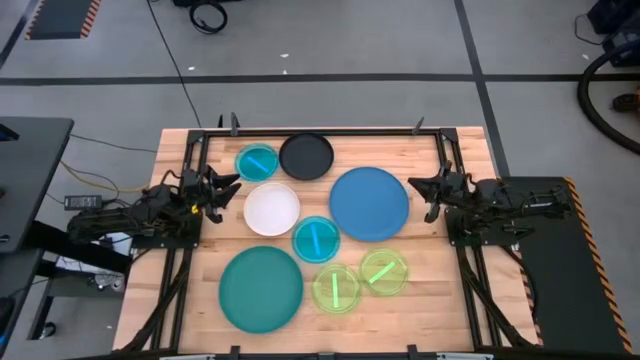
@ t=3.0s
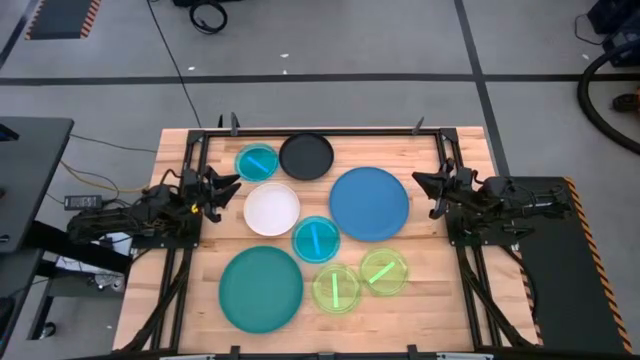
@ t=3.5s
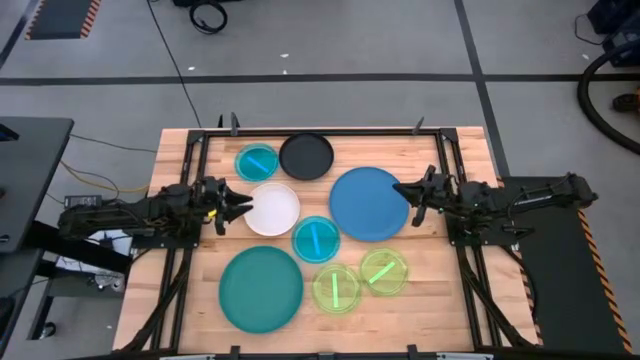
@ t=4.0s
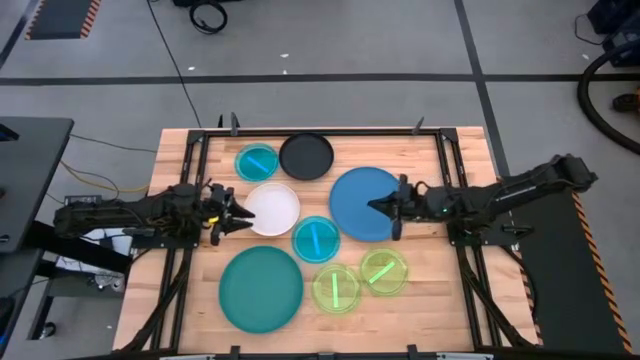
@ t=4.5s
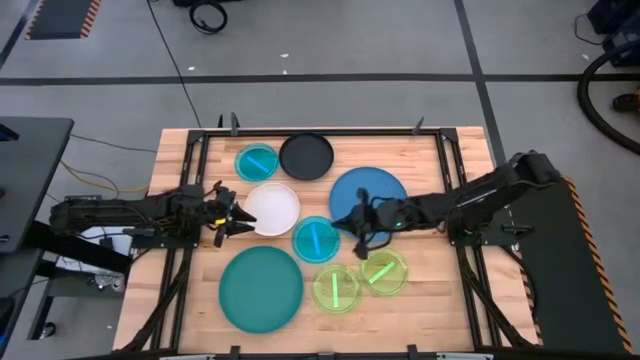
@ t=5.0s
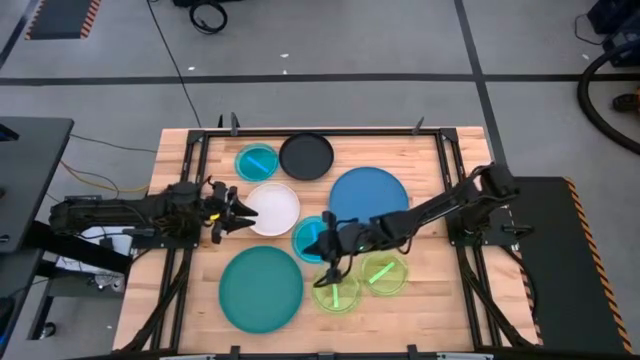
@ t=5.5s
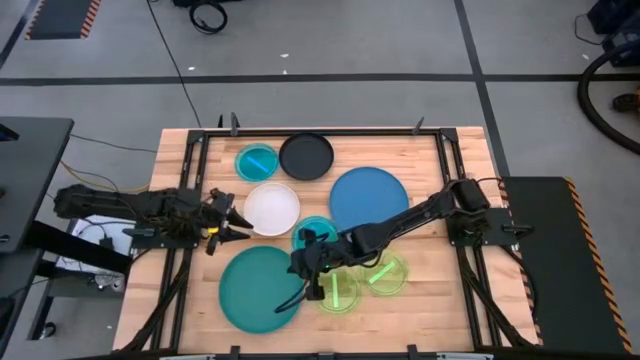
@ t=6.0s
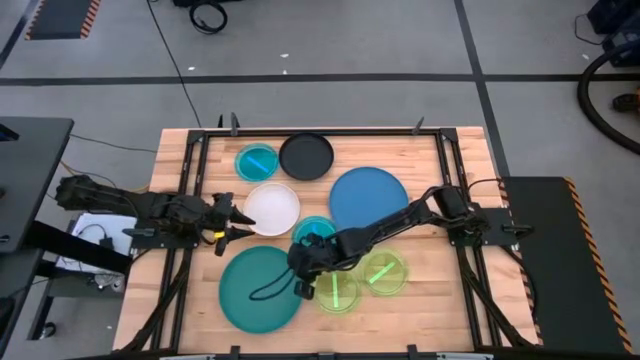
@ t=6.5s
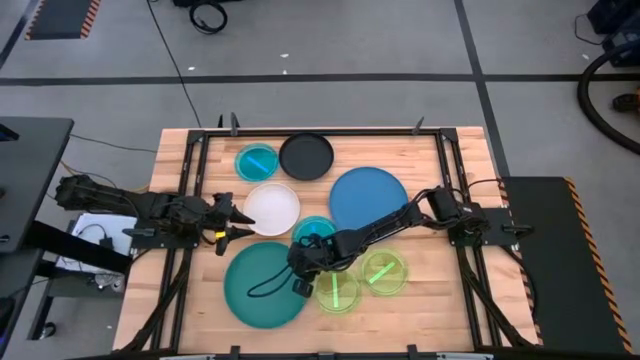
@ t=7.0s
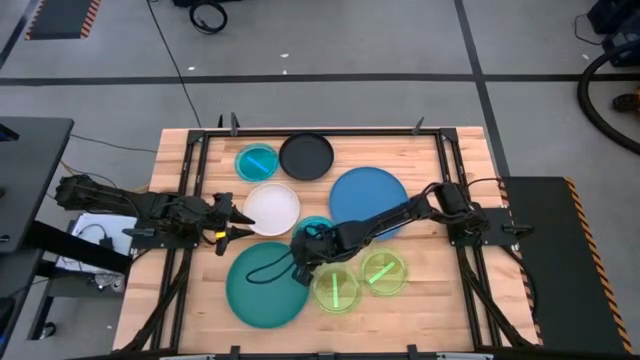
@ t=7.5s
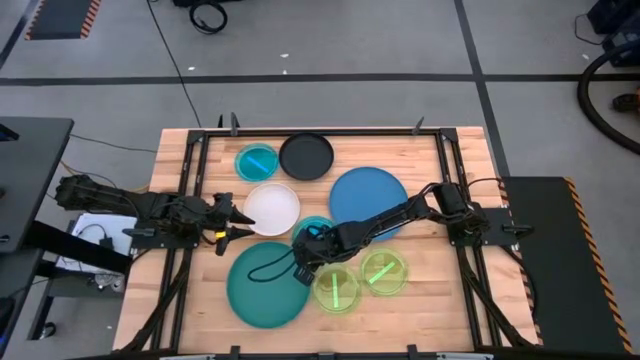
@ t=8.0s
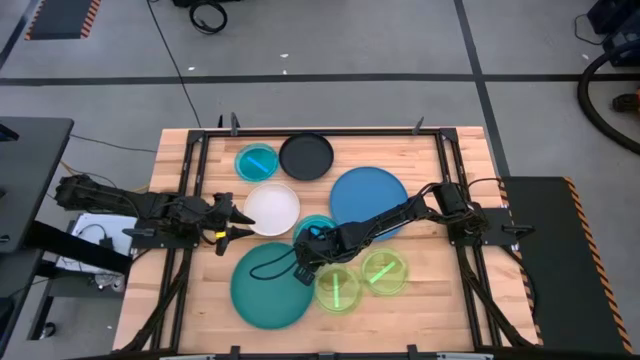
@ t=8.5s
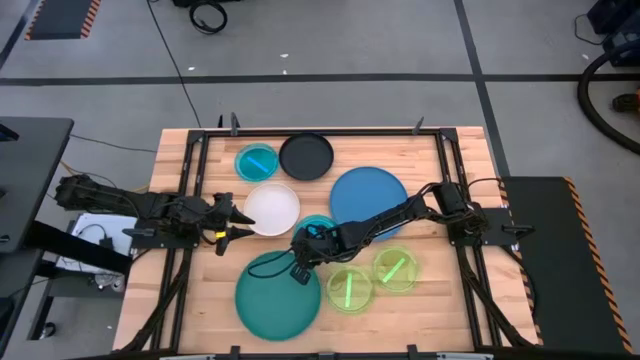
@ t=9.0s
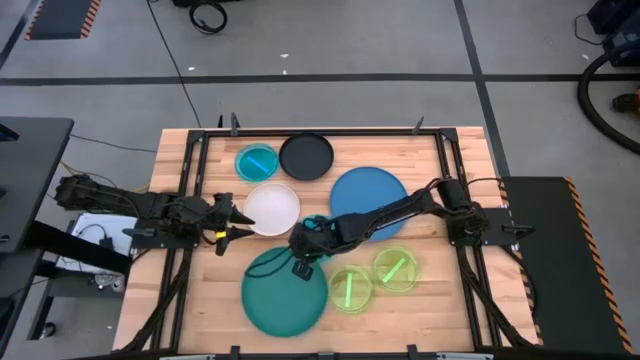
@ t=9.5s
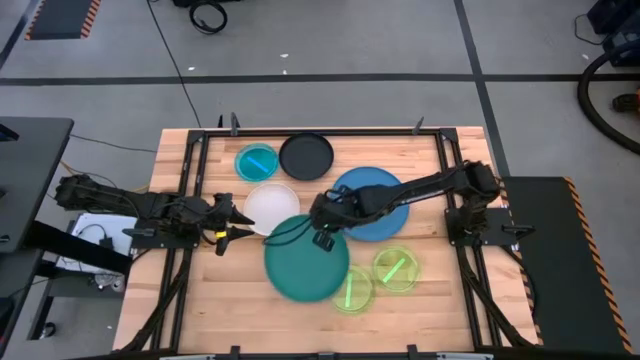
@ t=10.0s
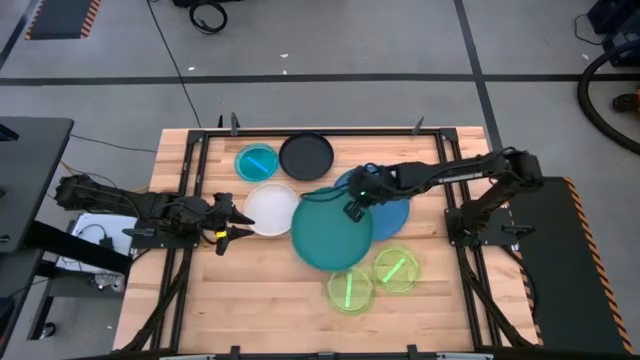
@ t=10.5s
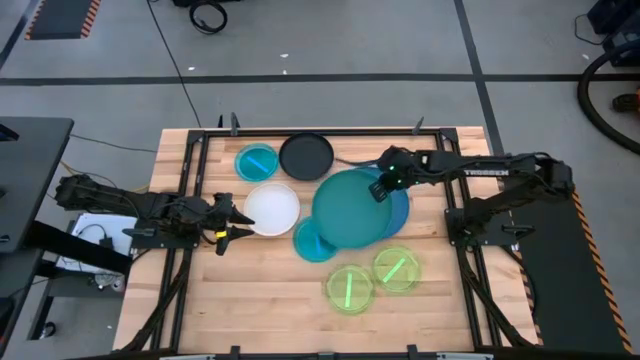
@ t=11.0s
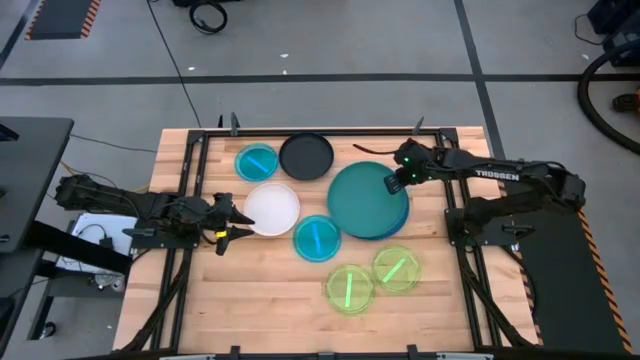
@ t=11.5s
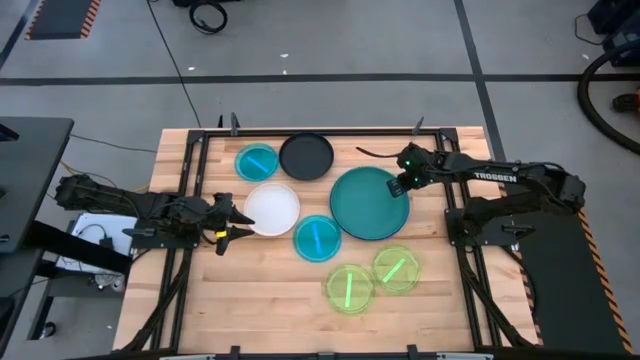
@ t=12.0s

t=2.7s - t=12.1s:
Task: Stack plastic plates
Stack the green plate on top of the blue plate

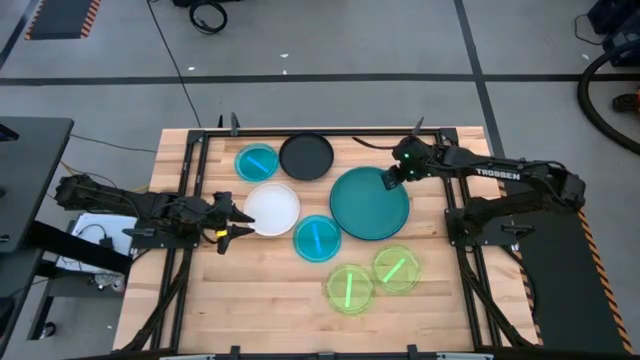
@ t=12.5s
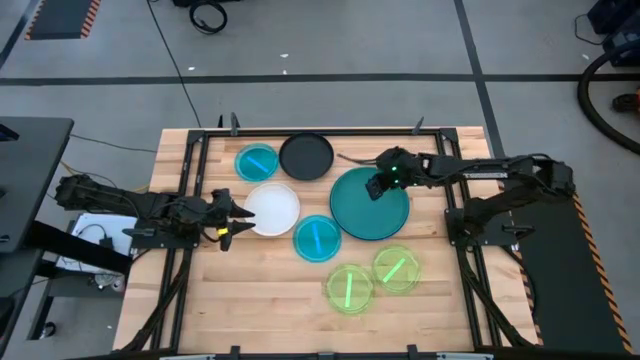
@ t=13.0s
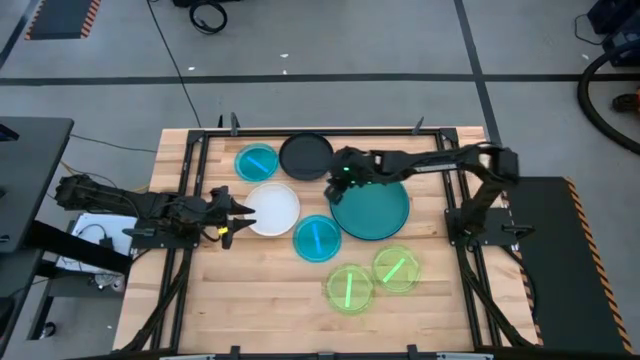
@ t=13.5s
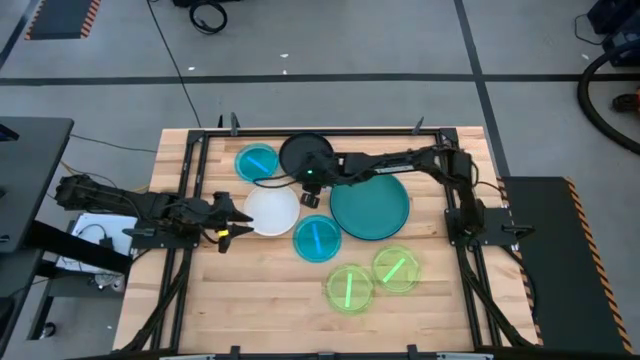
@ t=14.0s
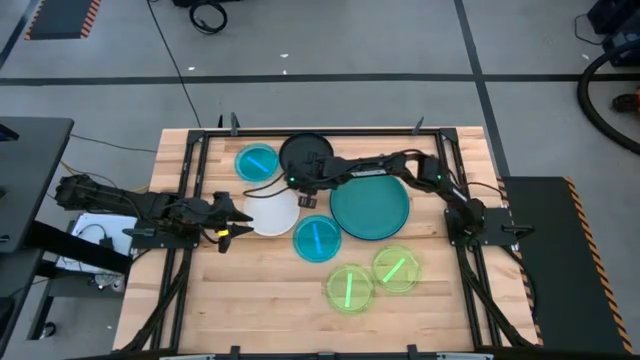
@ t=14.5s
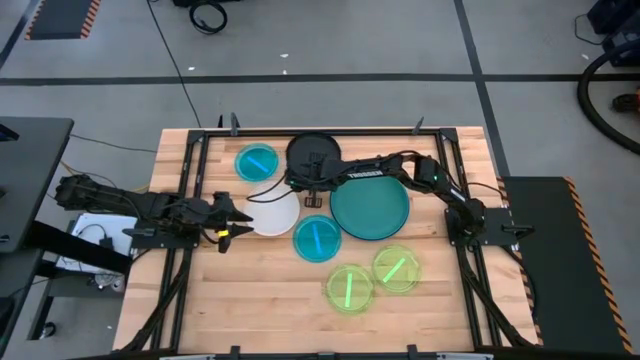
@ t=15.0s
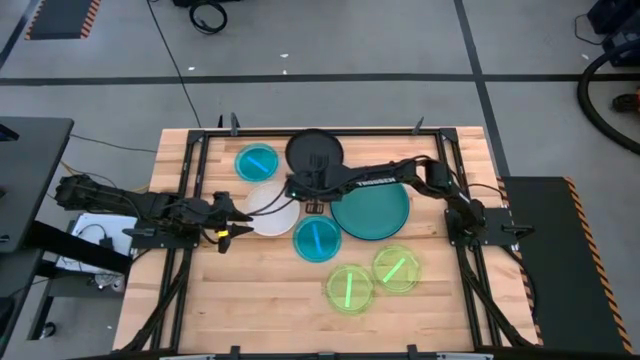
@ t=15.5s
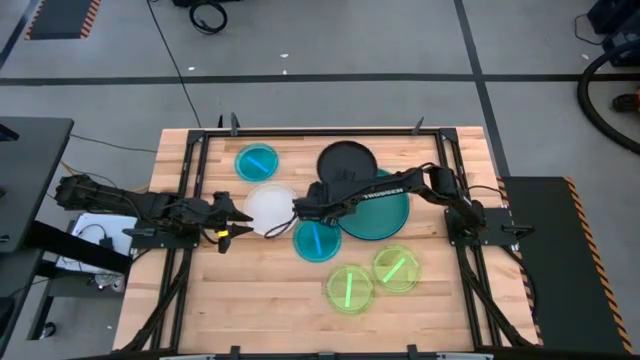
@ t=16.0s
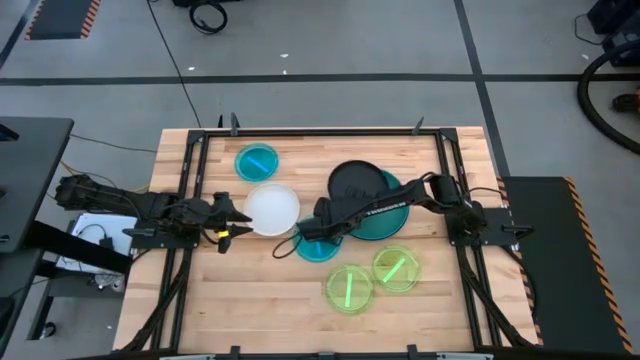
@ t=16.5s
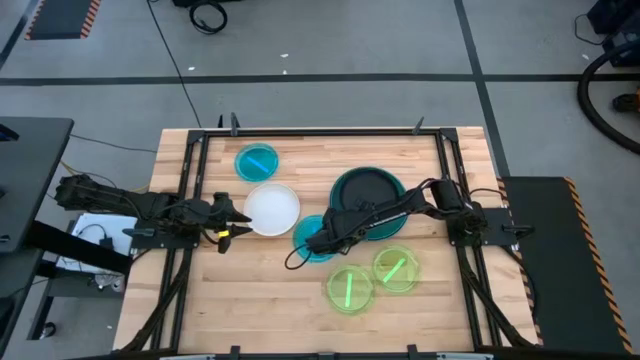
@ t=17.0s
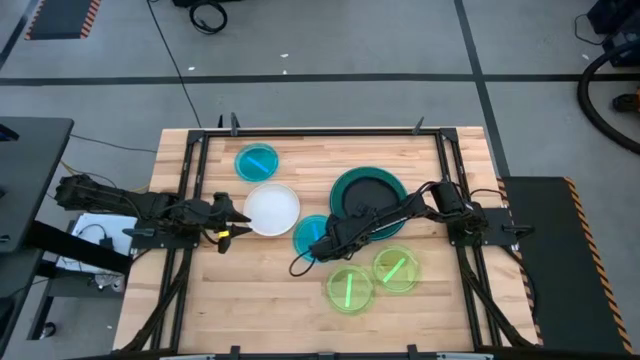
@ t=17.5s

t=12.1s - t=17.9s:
Stack the black plate on top of the green plate

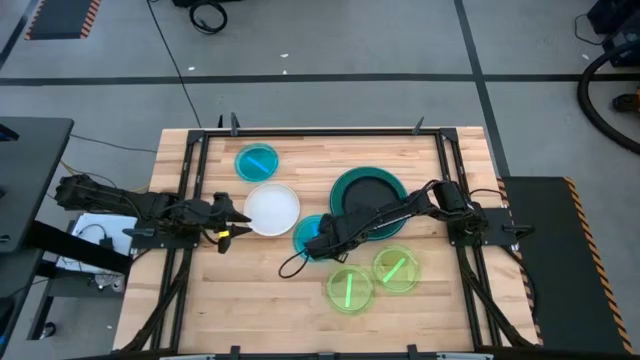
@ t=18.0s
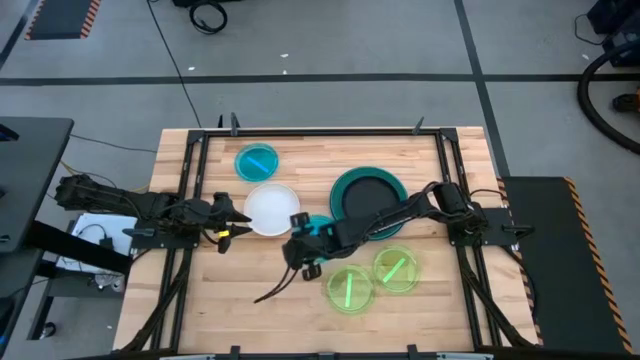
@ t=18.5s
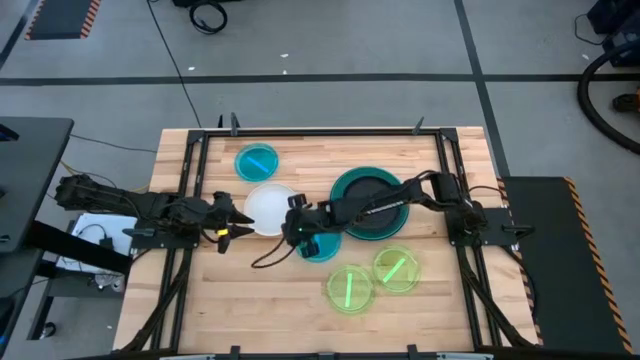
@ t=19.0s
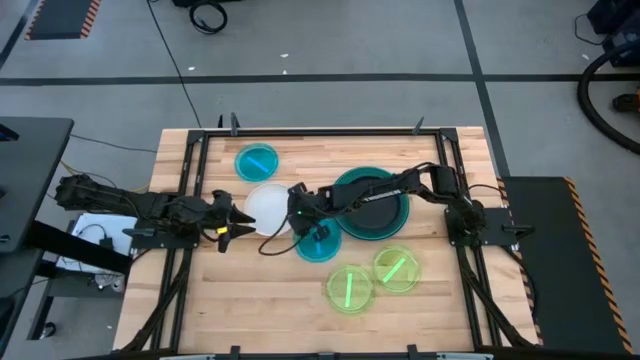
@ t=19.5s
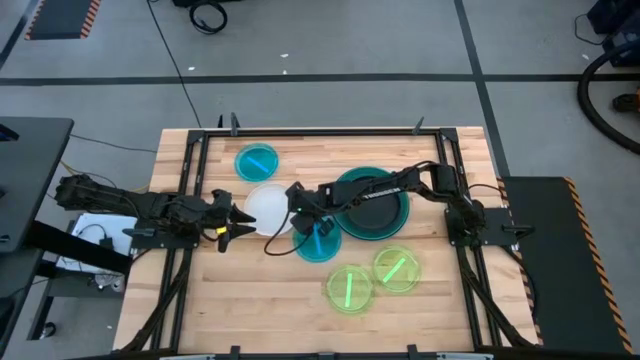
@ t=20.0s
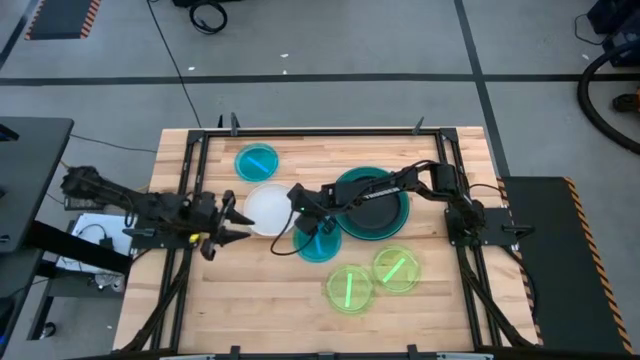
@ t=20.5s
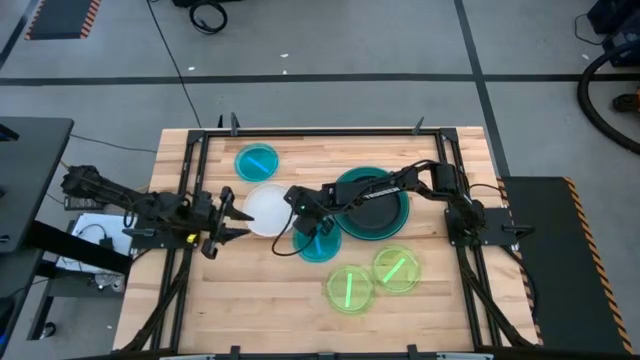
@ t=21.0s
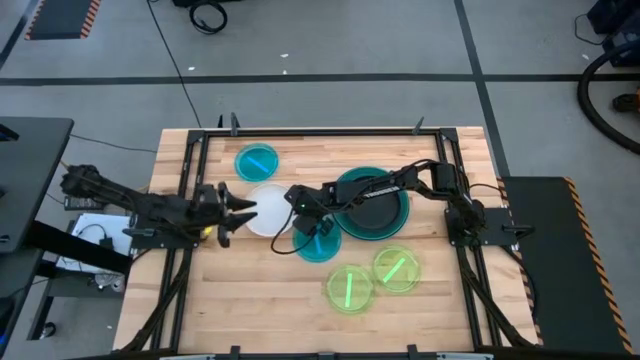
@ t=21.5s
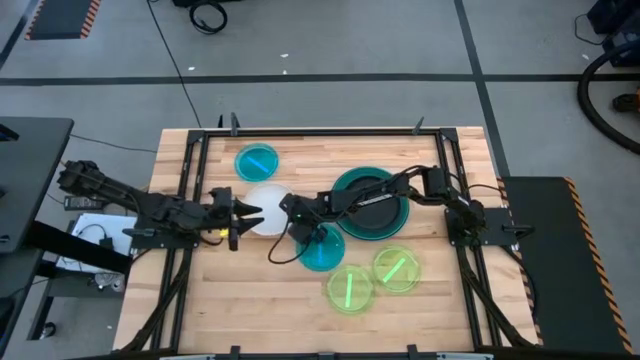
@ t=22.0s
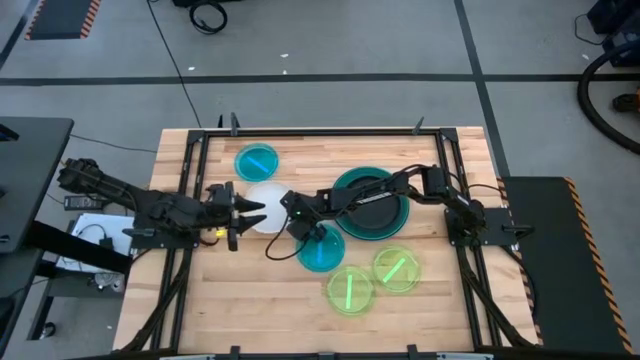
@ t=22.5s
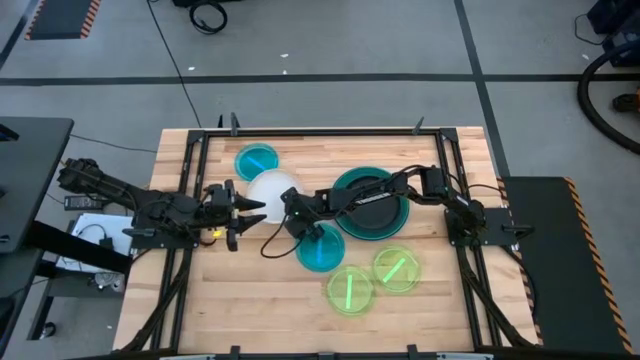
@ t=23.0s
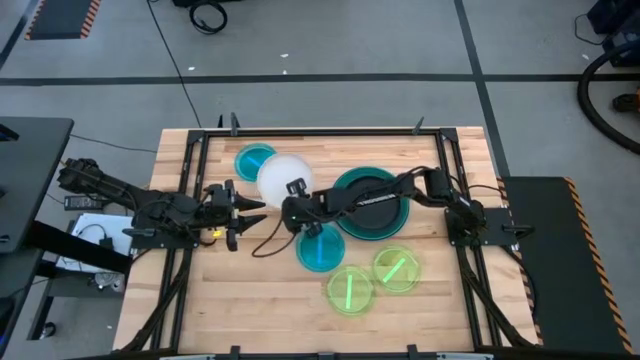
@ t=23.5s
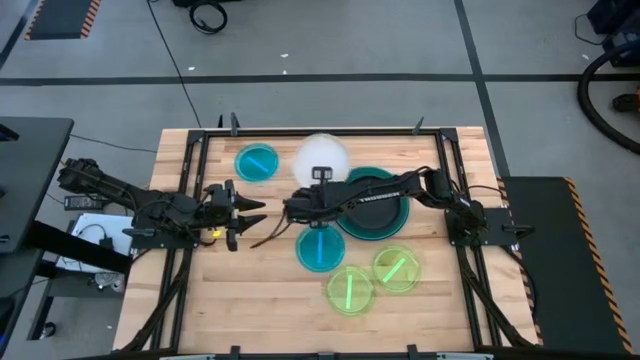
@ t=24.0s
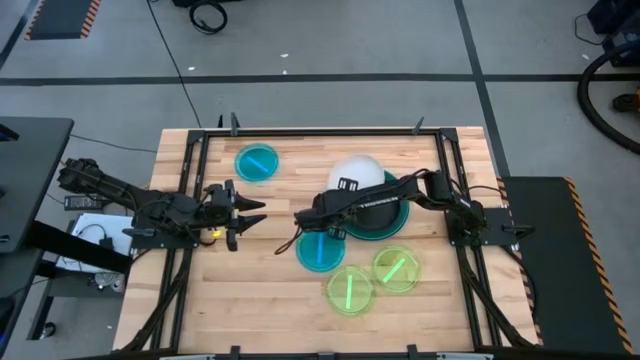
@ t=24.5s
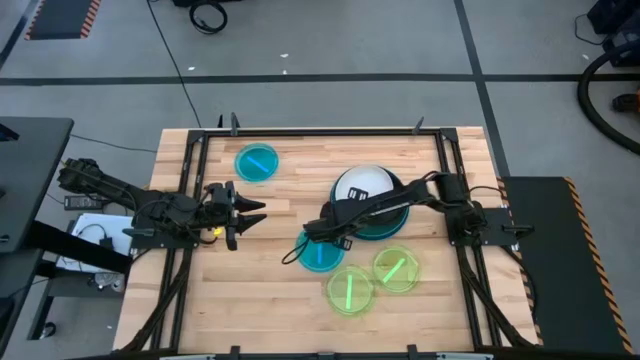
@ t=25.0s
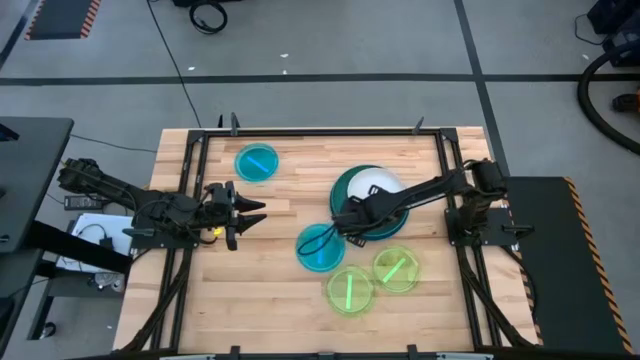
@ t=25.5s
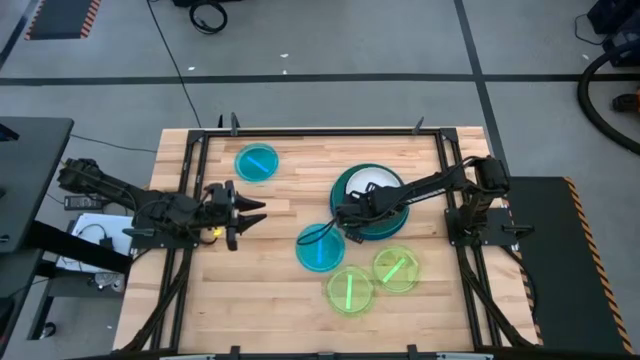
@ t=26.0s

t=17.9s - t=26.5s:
Stack the white plate on top of the black plate
